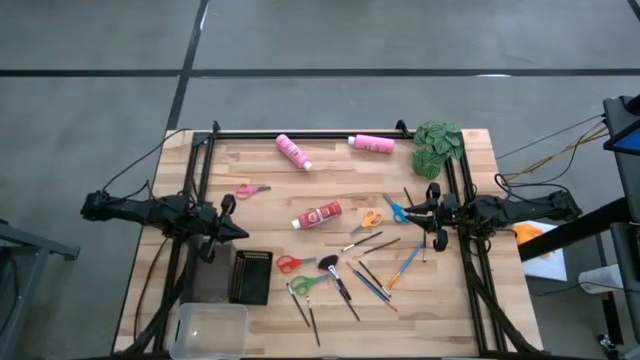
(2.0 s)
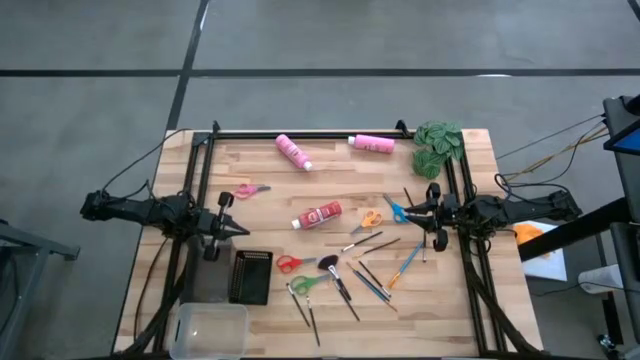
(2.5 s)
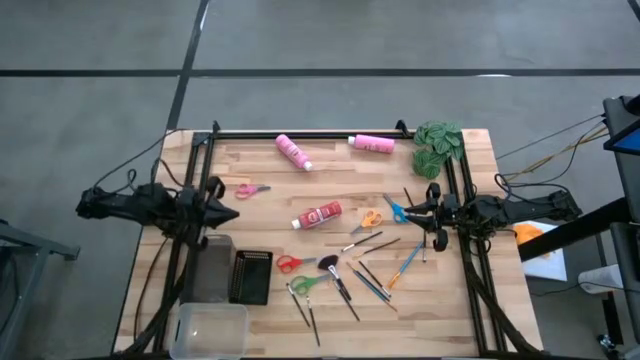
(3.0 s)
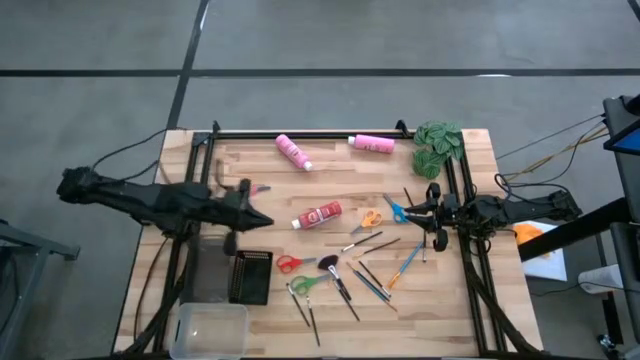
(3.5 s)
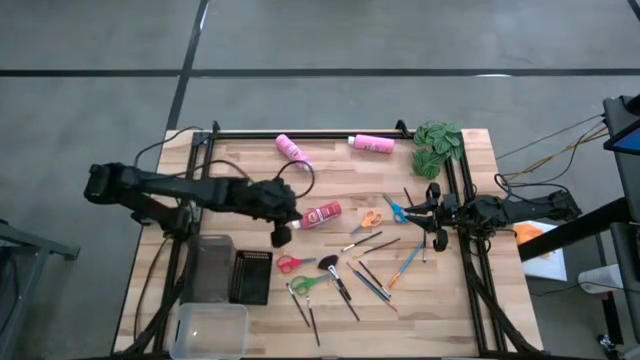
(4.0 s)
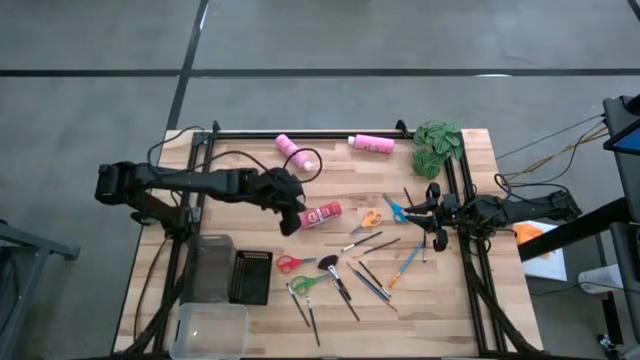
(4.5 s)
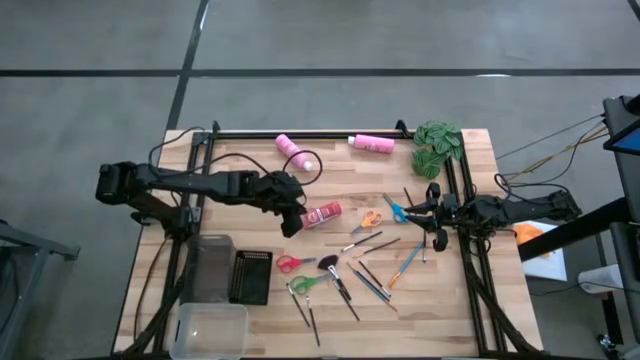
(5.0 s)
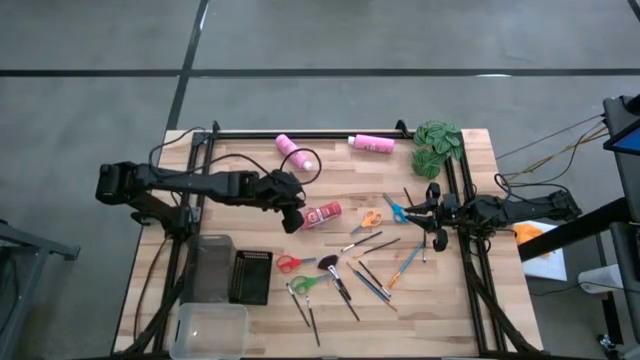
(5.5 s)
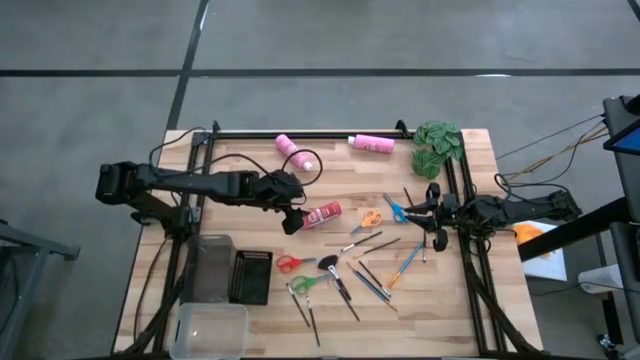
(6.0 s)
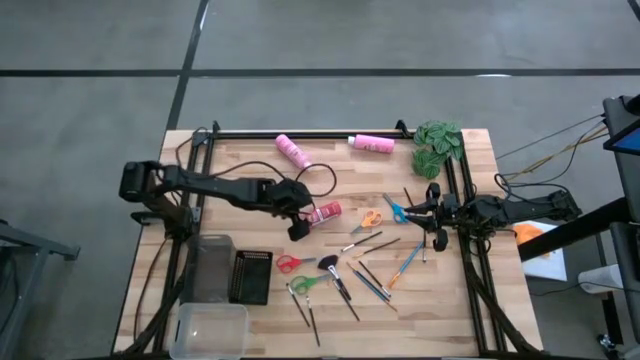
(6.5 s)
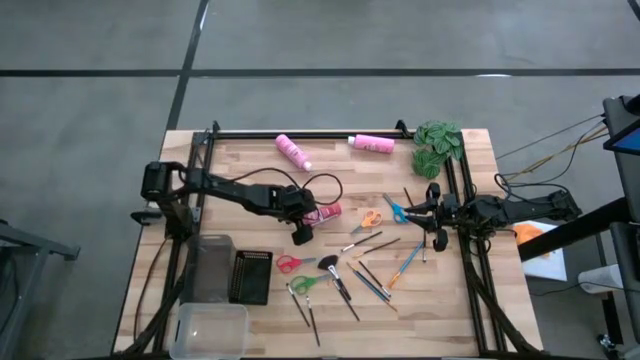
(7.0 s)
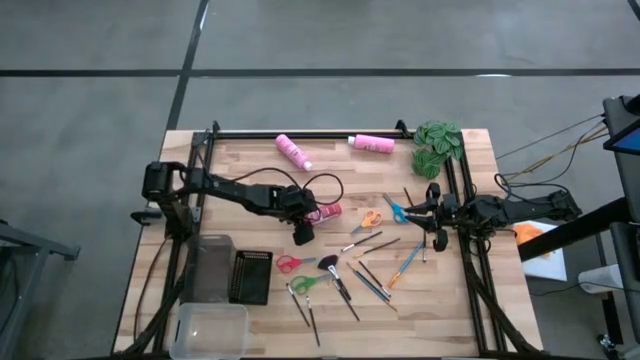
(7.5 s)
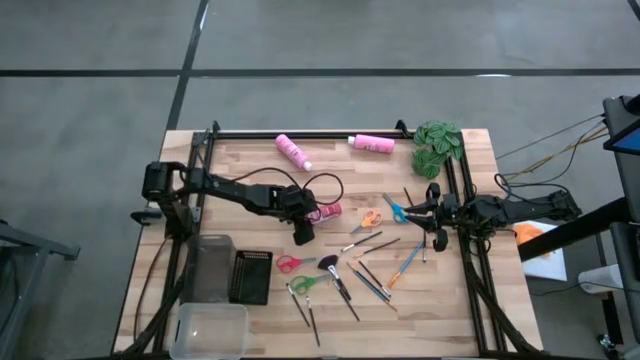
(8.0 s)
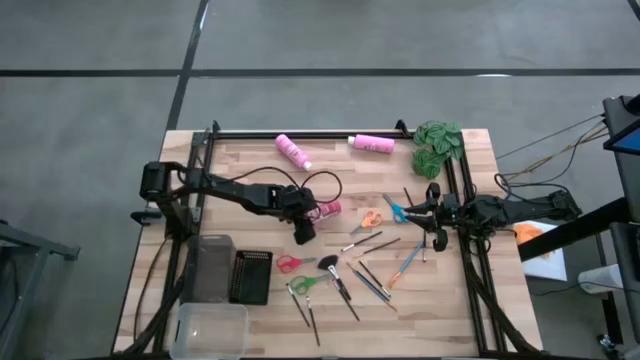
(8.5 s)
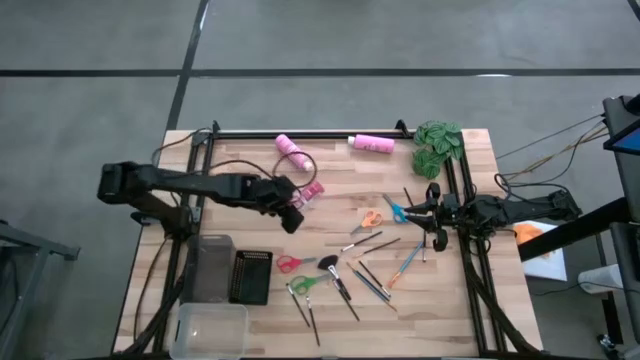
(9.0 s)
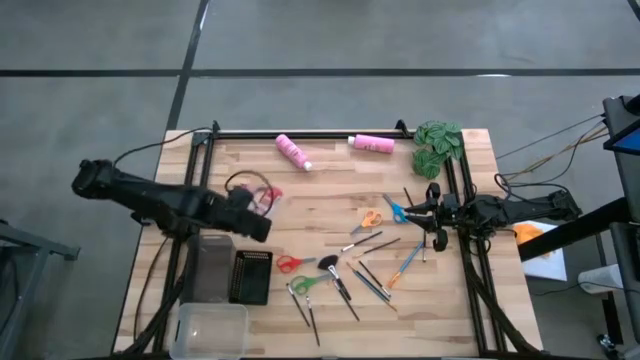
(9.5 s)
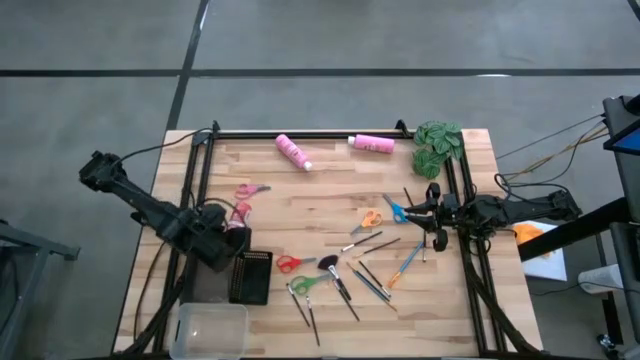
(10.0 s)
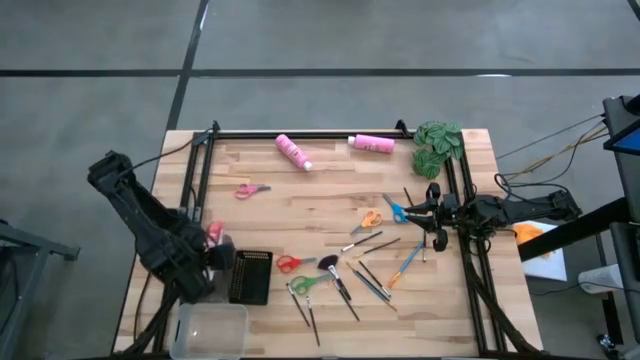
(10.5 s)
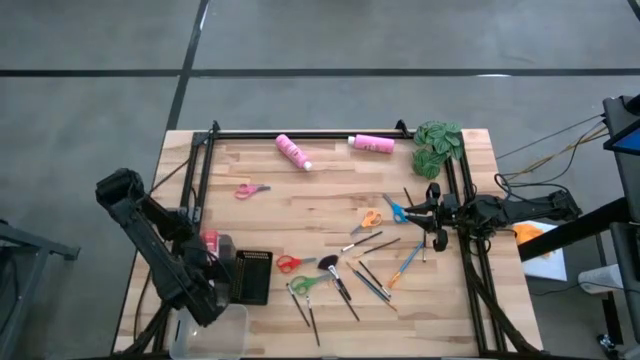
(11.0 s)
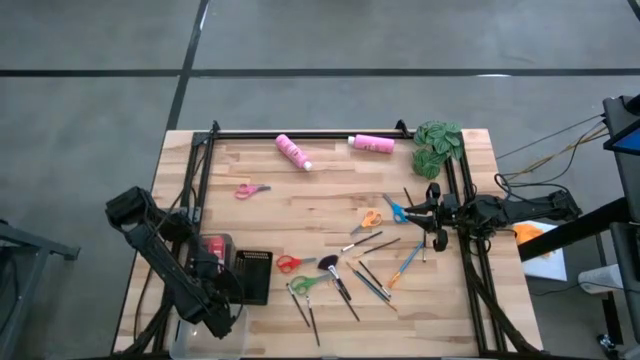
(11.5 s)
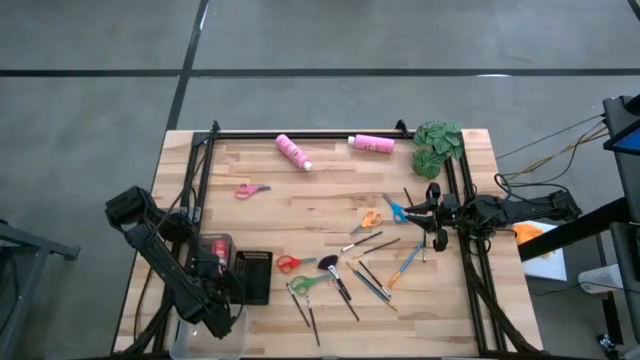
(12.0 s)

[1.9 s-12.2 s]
Task: Pick & Place Paint Supplies
Put the red paint bottle into the gray bin

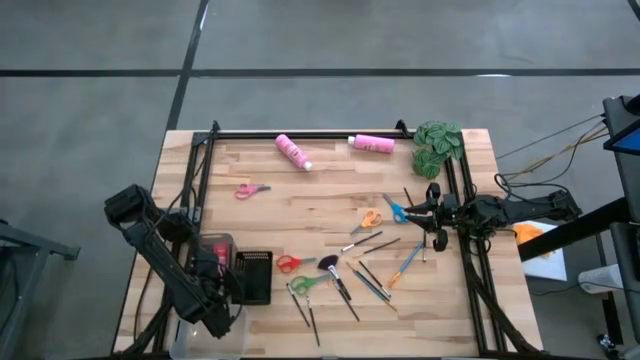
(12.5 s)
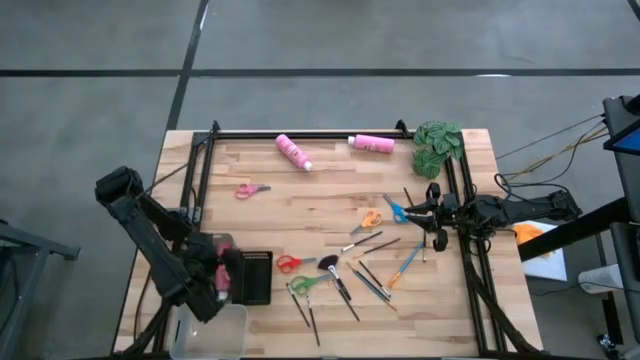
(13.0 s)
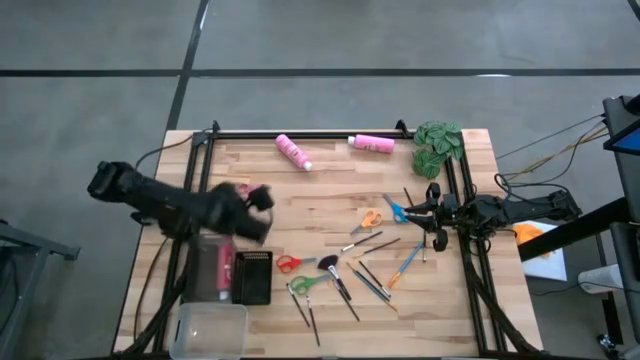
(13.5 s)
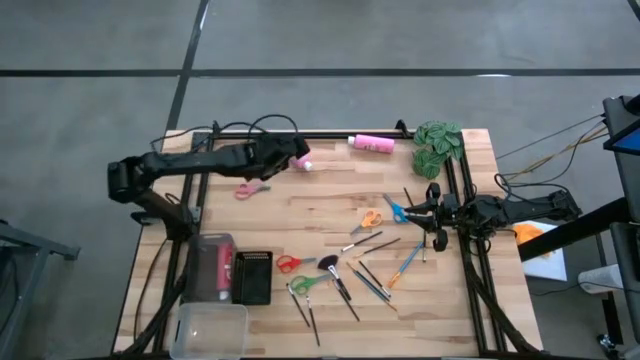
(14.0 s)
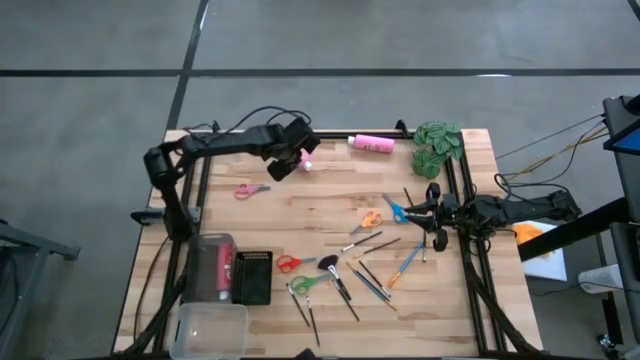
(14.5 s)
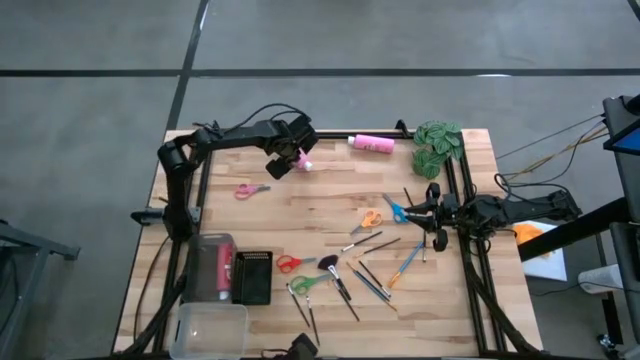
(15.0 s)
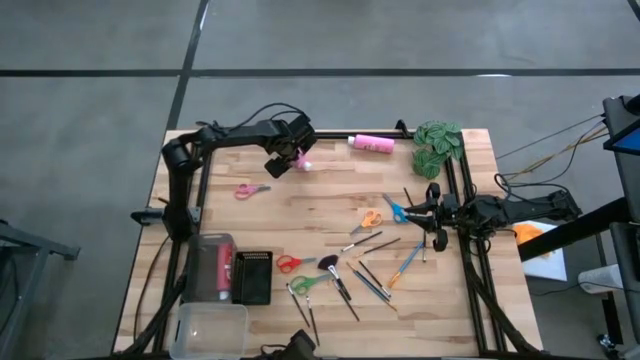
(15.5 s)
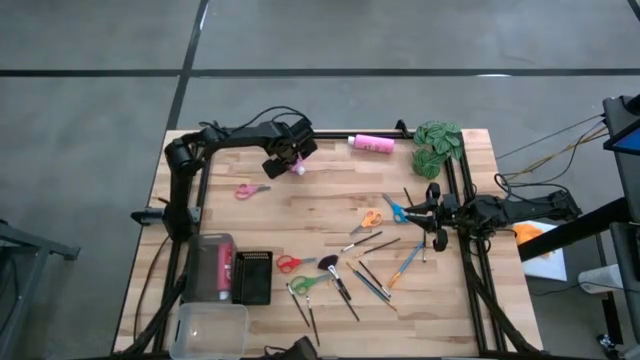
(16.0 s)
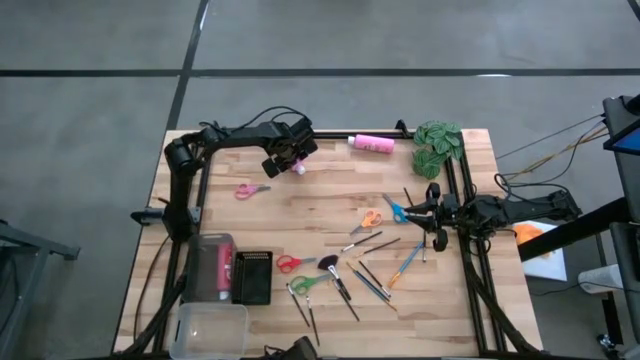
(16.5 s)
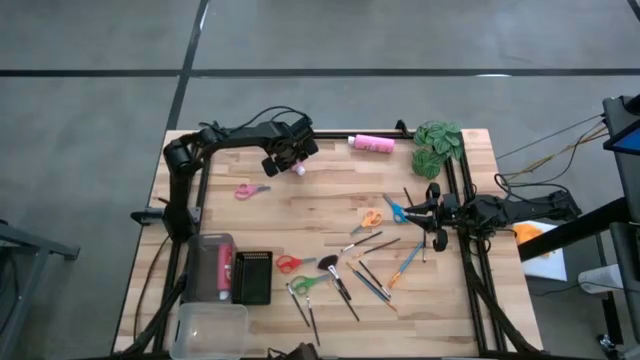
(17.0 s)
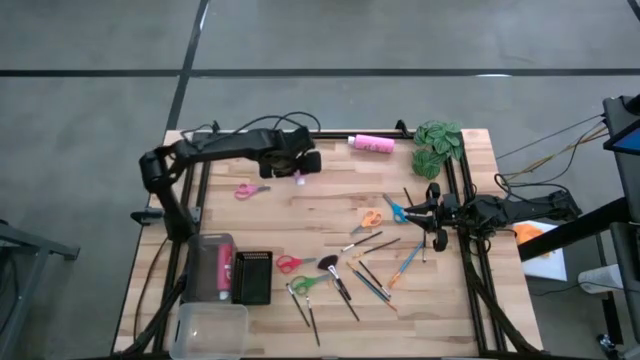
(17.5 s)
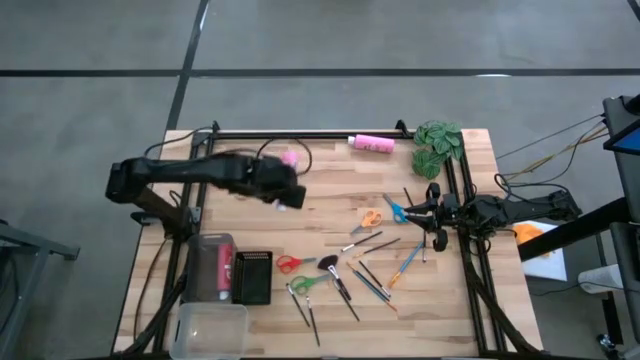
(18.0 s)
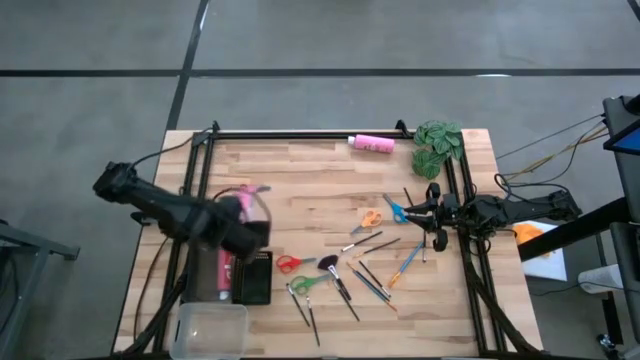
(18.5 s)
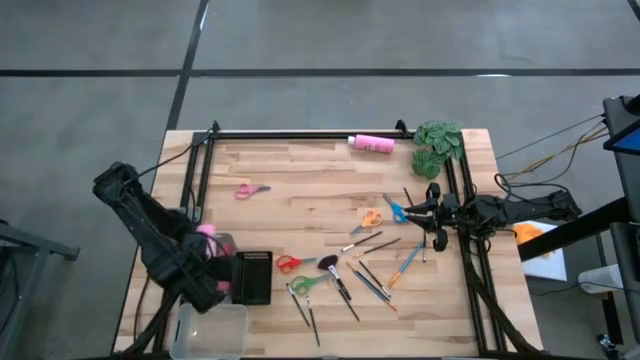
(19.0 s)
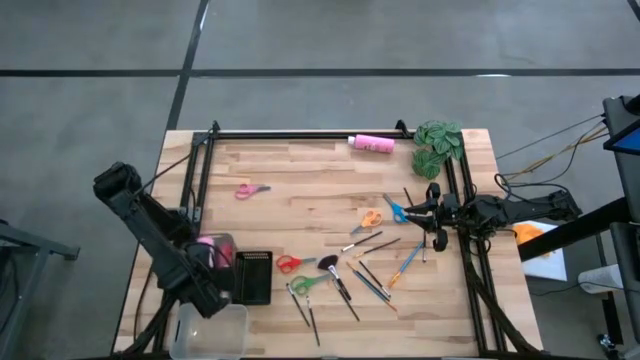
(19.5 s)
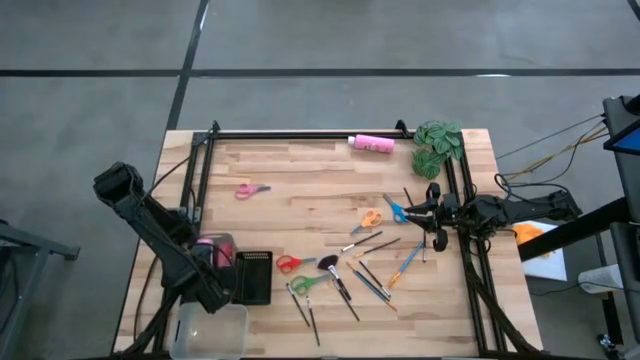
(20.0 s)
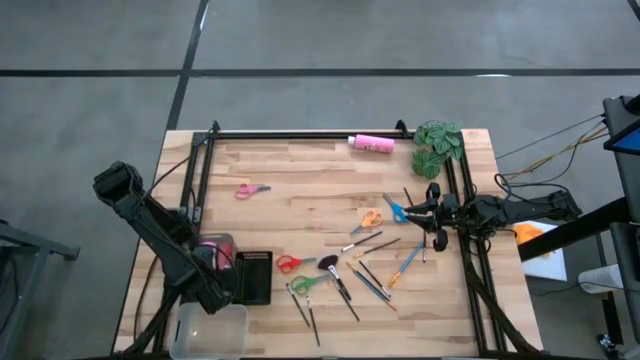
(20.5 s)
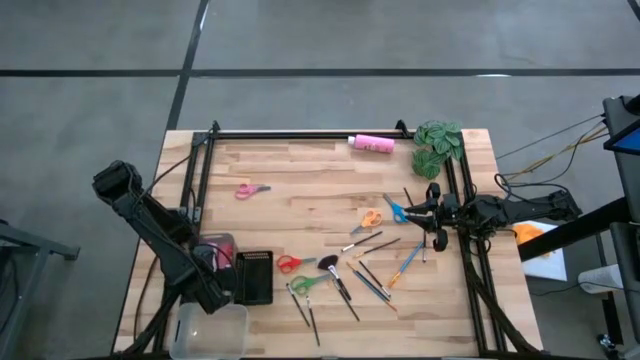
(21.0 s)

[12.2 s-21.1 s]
Put the pink paint bottle into the gray bin

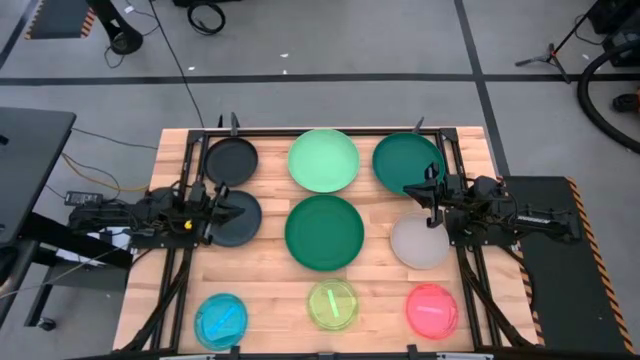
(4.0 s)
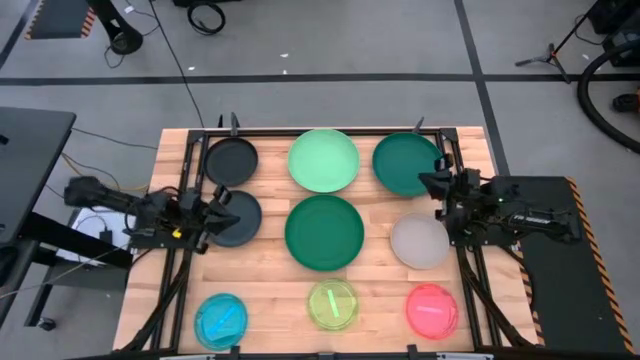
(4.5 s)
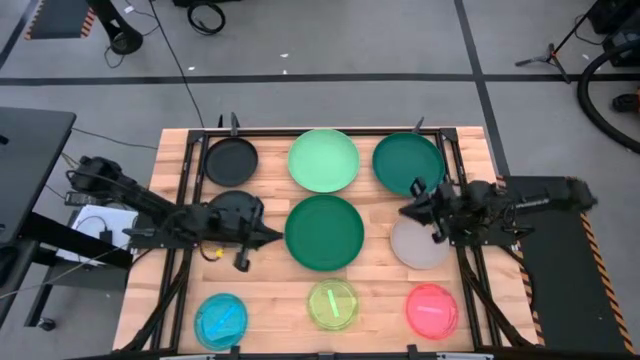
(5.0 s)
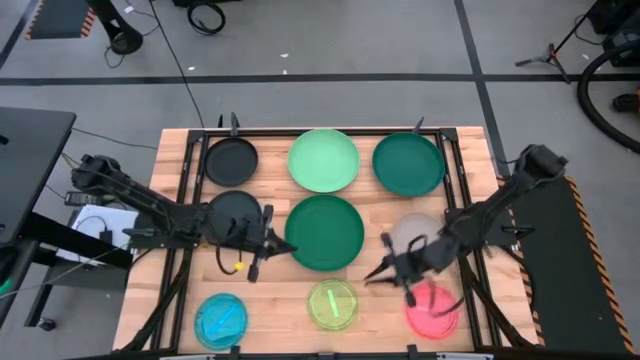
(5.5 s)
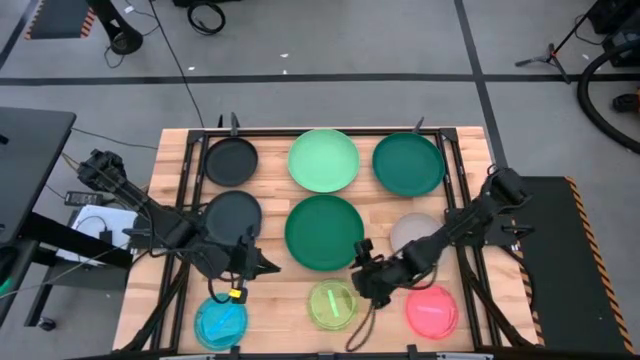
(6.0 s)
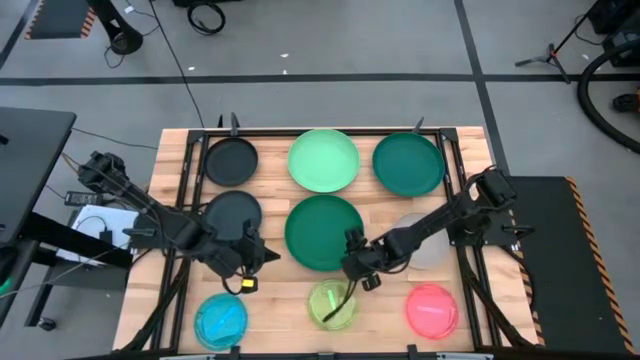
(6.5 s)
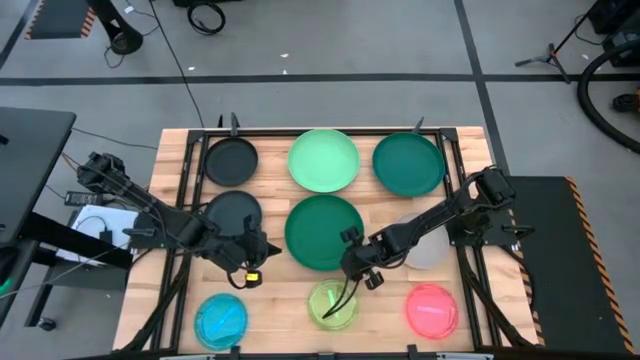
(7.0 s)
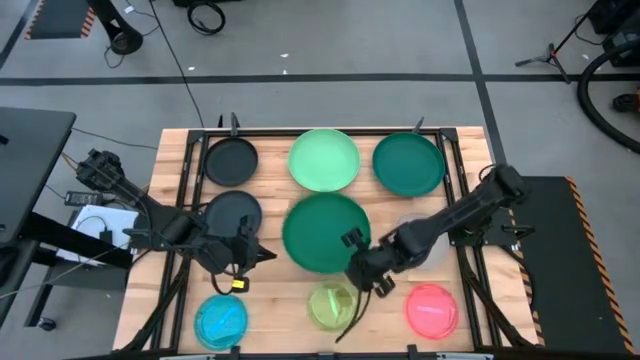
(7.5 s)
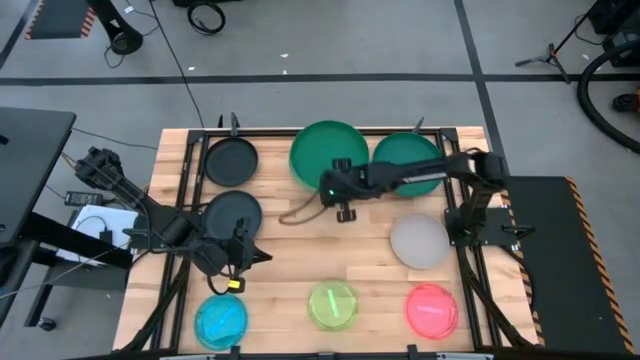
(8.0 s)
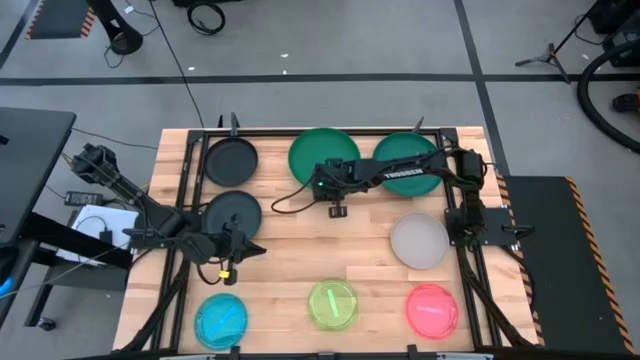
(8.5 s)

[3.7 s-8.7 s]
Task: Stack plastic plates
Stack the left dark green plate on top of the green plate
